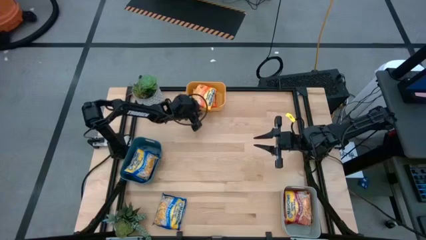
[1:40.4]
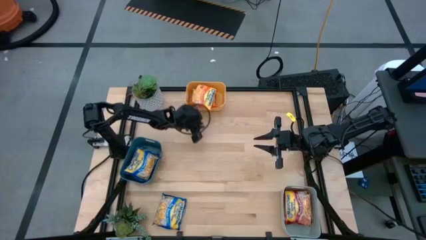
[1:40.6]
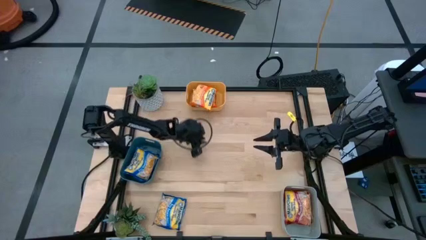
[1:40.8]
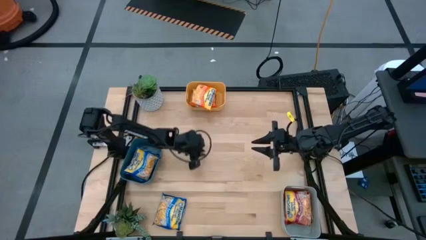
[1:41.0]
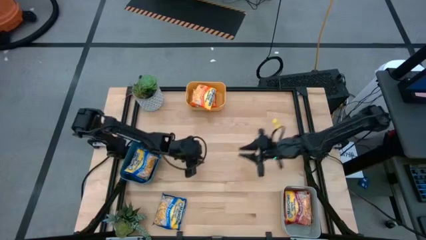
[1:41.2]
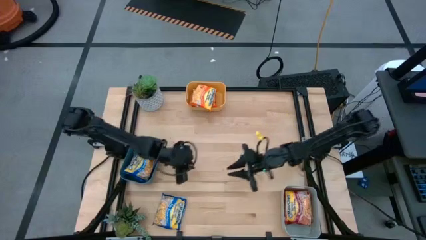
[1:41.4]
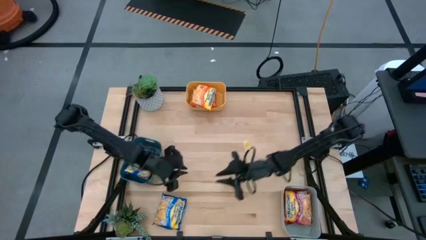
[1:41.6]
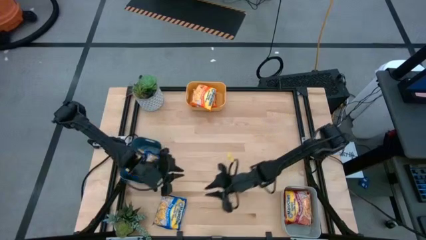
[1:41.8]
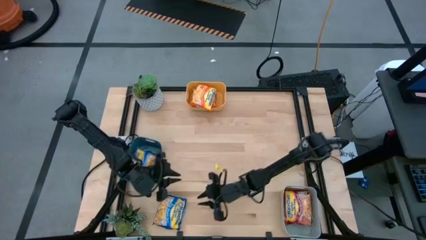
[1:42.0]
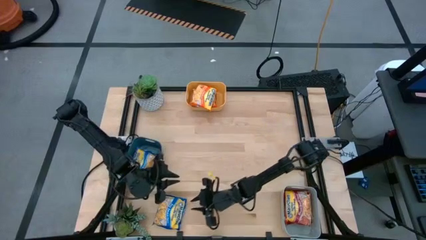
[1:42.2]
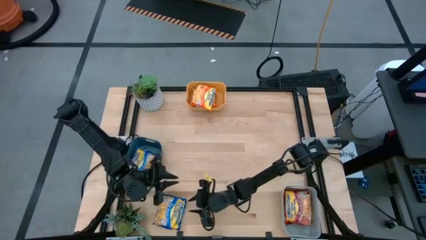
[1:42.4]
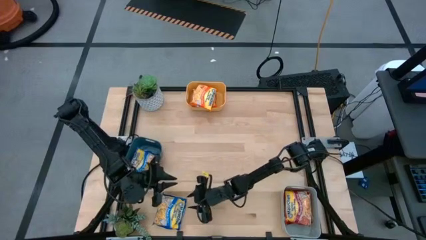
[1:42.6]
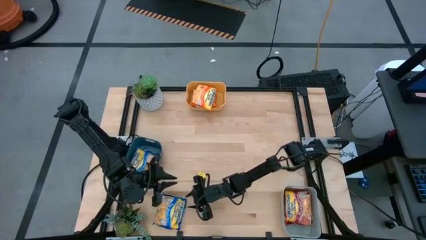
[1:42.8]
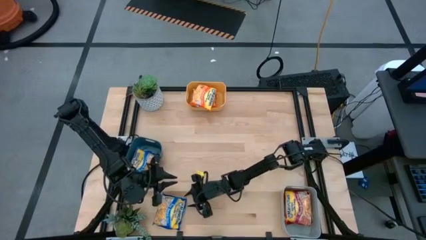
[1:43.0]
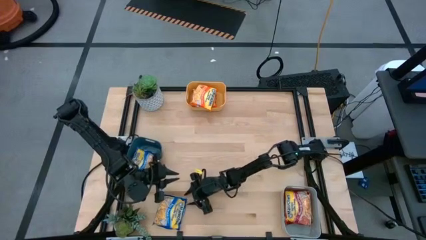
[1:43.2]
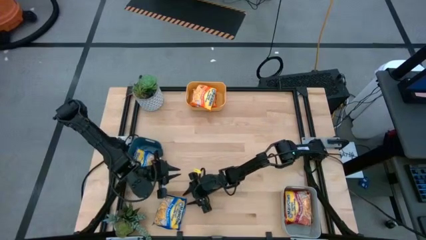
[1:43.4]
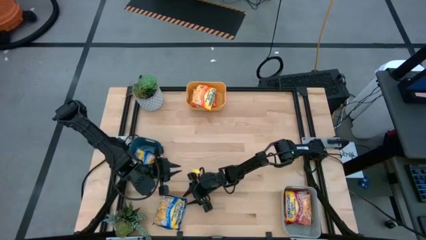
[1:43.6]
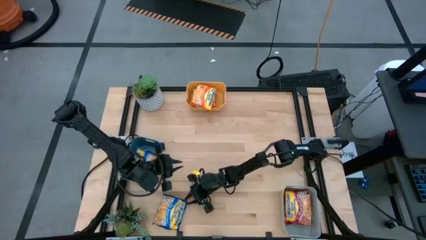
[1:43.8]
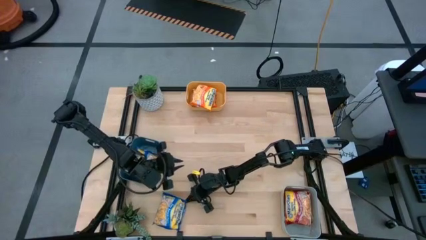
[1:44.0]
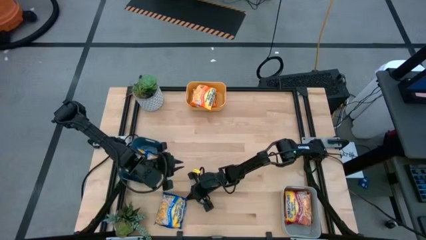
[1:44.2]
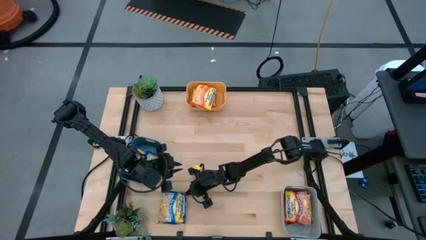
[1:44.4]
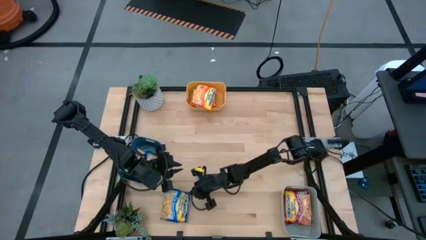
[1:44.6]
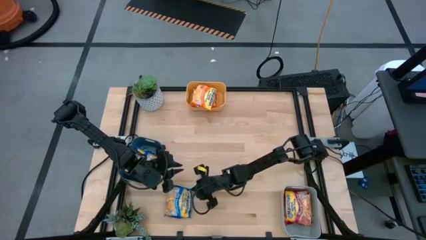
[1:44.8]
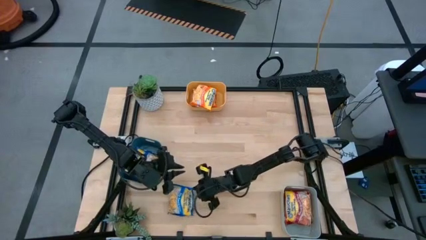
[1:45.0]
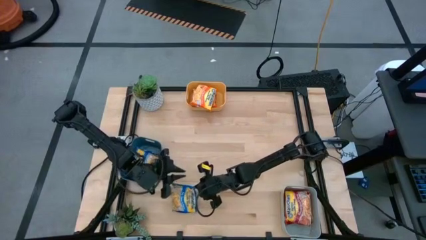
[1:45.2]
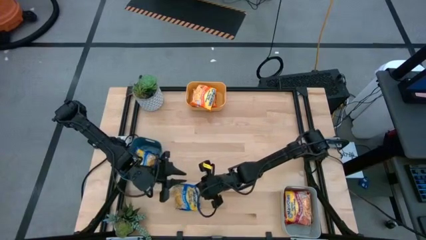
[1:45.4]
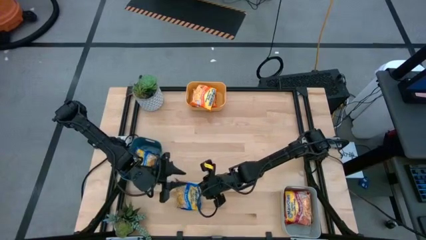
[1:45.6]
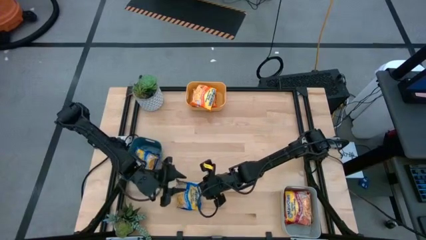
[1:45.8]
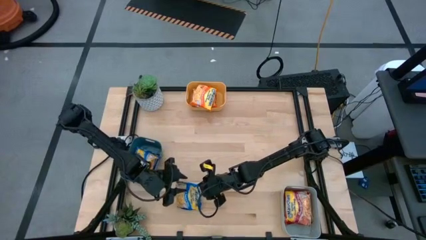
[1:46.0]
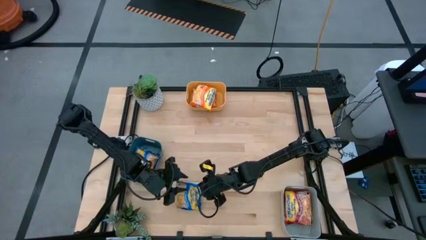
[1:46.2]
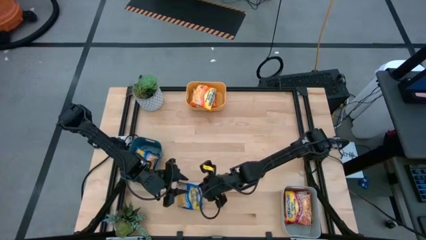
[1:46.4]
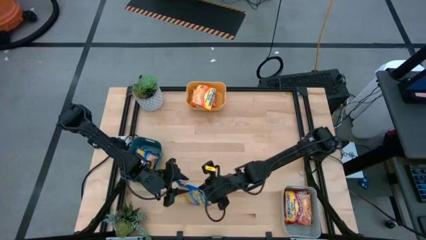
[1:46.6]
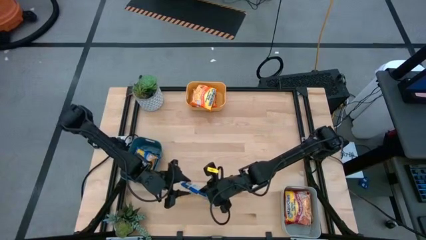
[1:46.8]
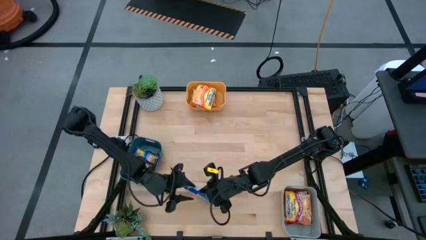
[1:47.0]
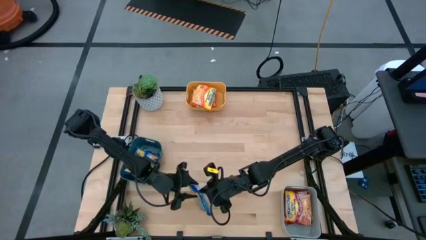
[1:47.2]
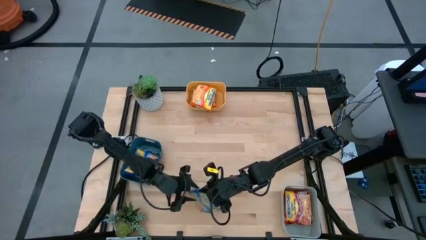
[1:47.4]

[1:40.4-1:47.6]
Task: Sort Maruchan noodles
Put the blue noodle pack into the blue bin

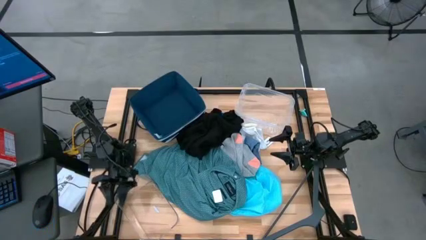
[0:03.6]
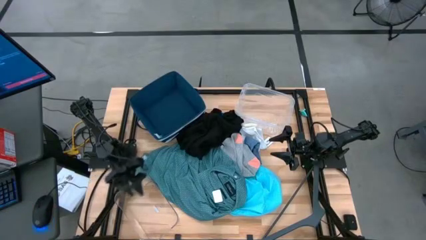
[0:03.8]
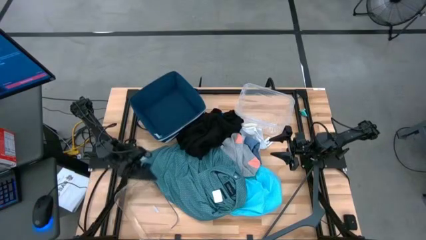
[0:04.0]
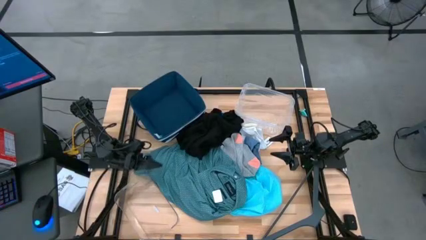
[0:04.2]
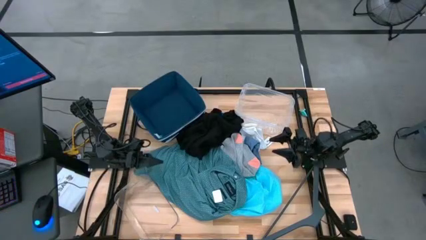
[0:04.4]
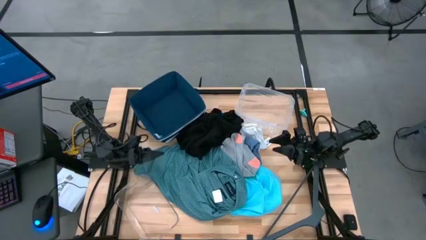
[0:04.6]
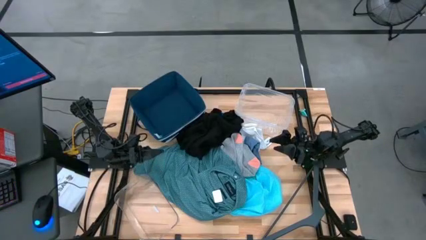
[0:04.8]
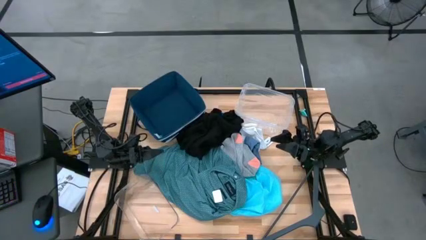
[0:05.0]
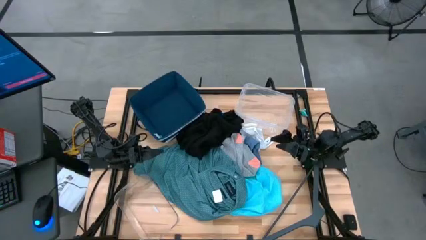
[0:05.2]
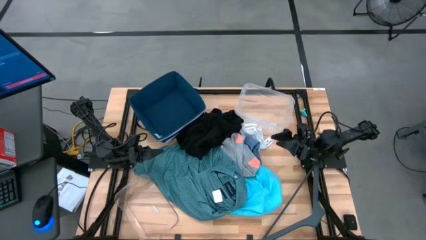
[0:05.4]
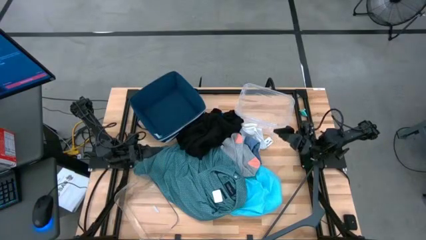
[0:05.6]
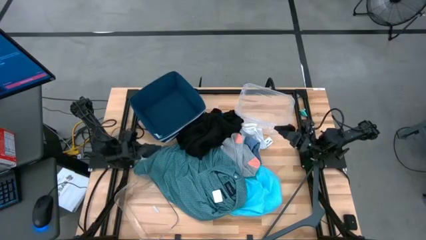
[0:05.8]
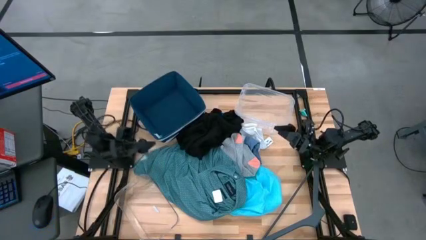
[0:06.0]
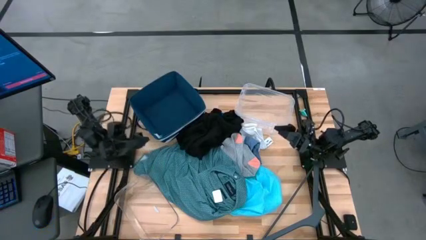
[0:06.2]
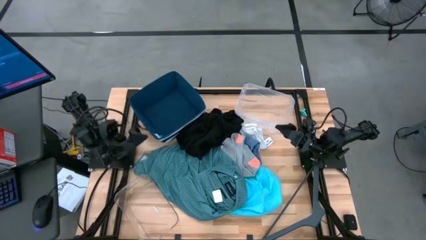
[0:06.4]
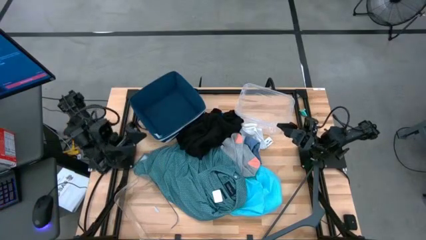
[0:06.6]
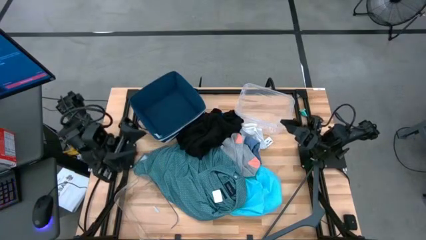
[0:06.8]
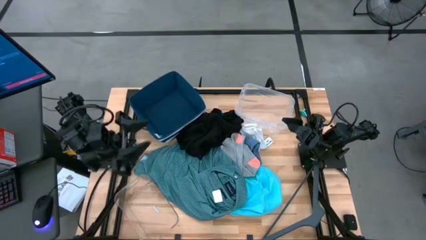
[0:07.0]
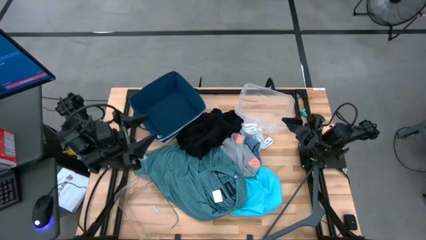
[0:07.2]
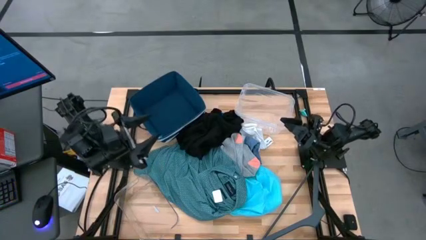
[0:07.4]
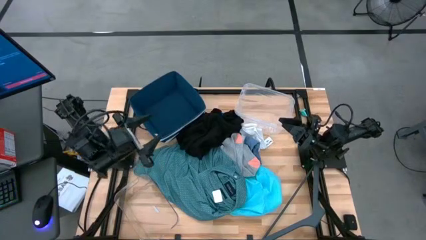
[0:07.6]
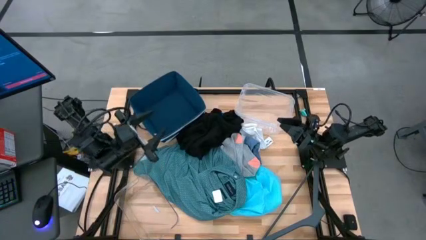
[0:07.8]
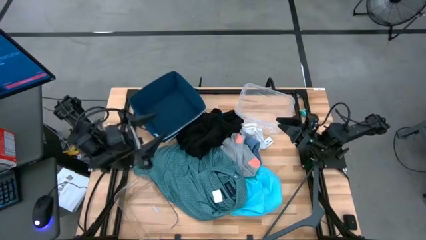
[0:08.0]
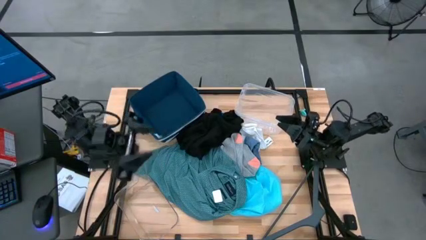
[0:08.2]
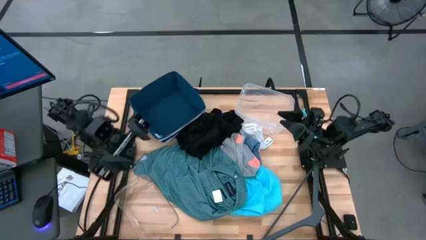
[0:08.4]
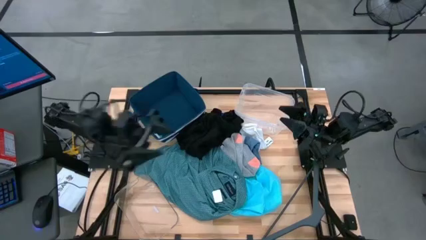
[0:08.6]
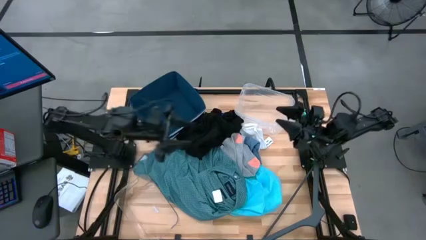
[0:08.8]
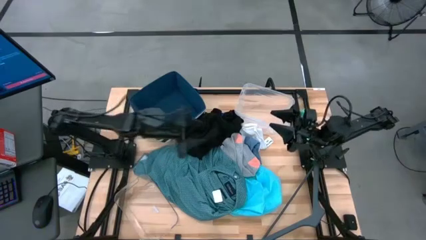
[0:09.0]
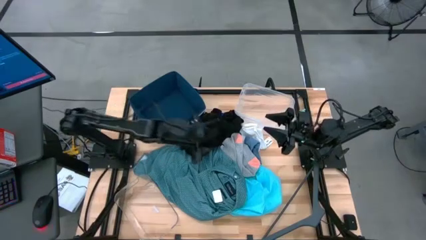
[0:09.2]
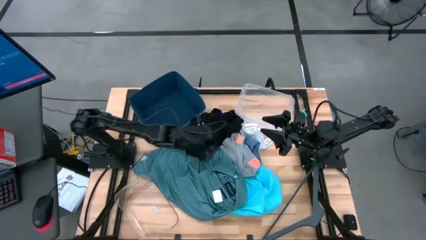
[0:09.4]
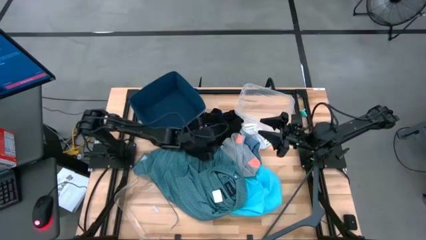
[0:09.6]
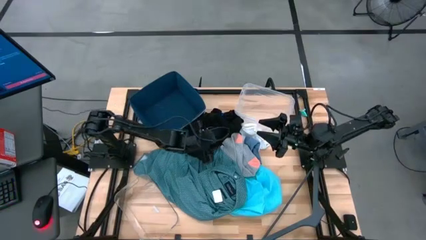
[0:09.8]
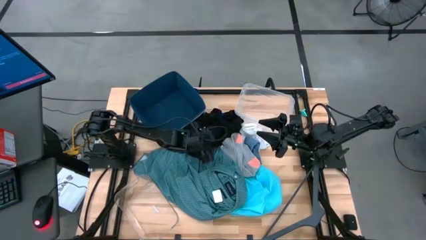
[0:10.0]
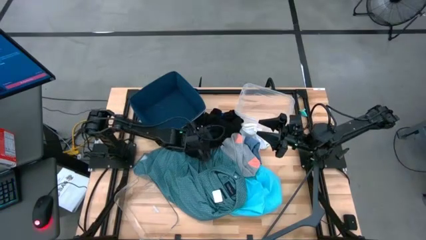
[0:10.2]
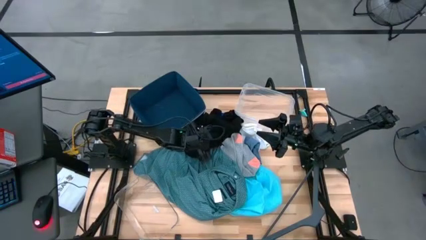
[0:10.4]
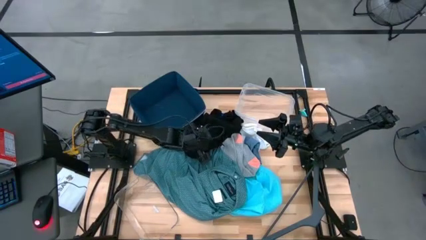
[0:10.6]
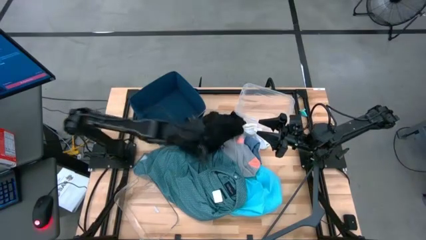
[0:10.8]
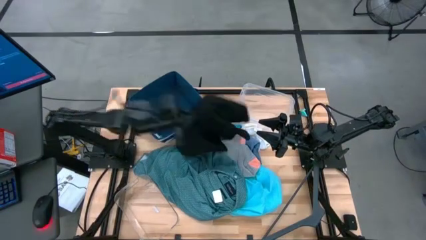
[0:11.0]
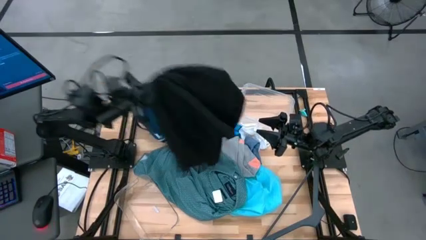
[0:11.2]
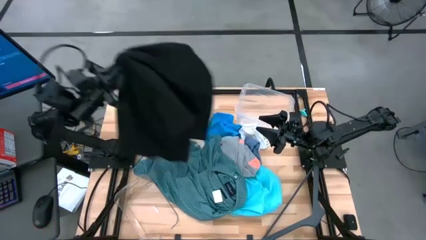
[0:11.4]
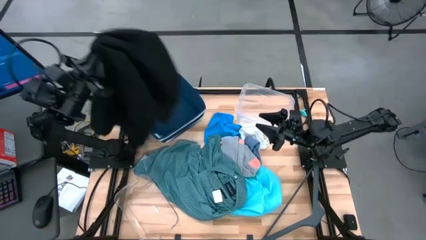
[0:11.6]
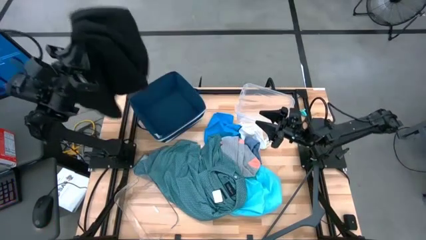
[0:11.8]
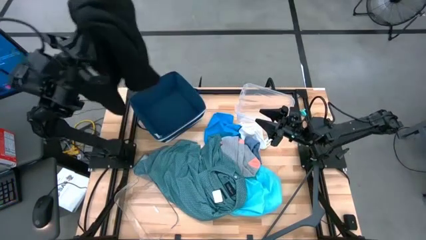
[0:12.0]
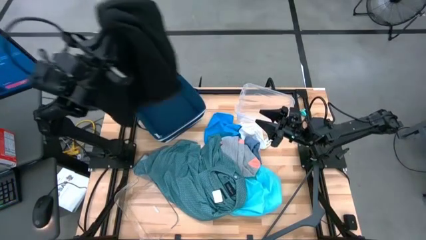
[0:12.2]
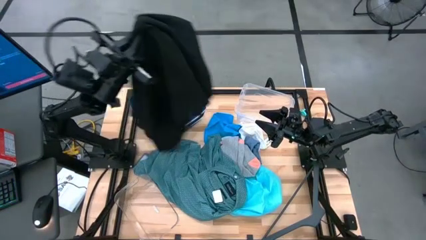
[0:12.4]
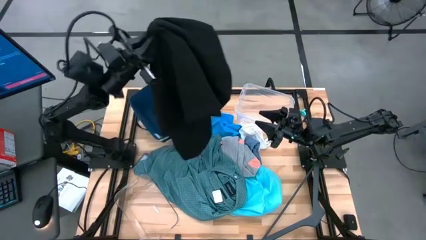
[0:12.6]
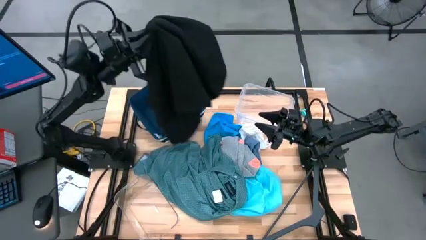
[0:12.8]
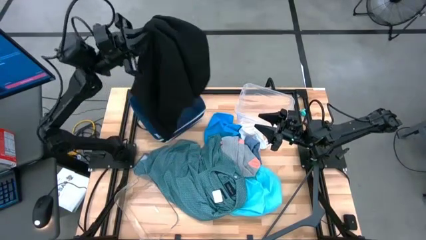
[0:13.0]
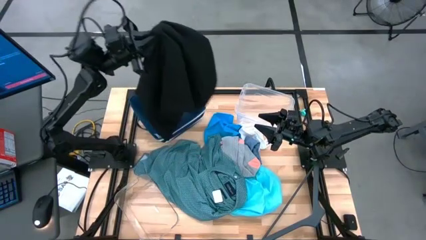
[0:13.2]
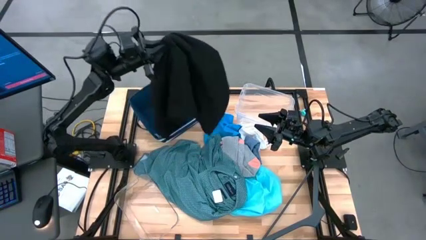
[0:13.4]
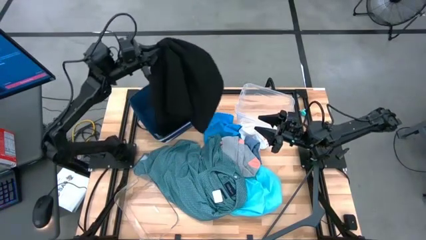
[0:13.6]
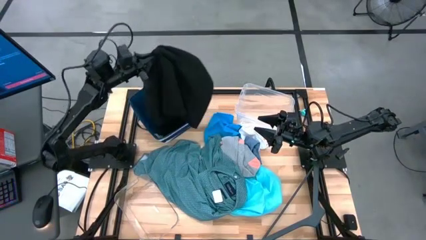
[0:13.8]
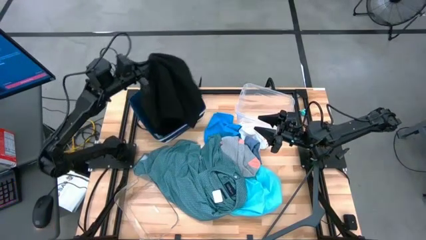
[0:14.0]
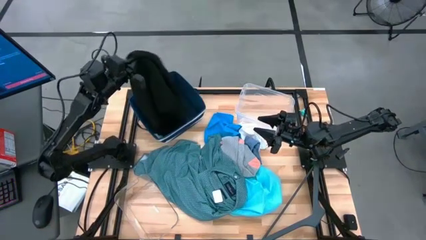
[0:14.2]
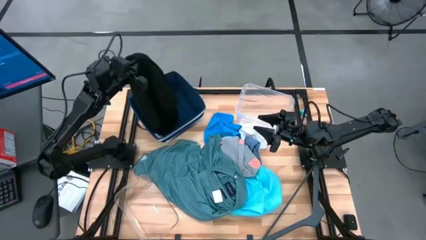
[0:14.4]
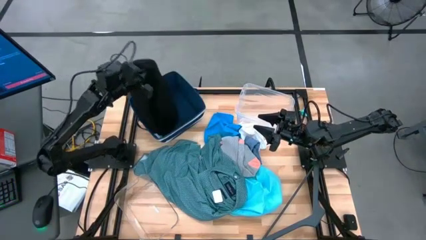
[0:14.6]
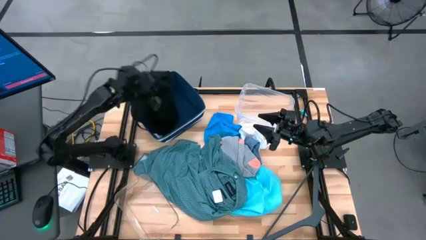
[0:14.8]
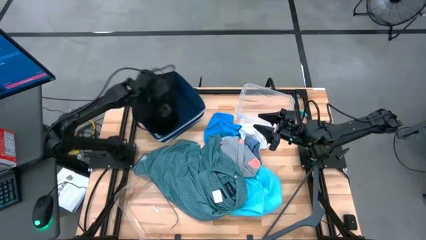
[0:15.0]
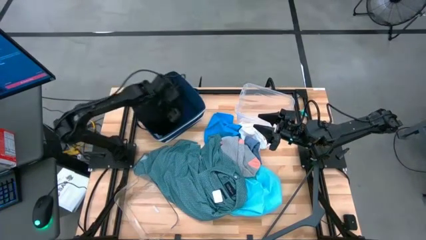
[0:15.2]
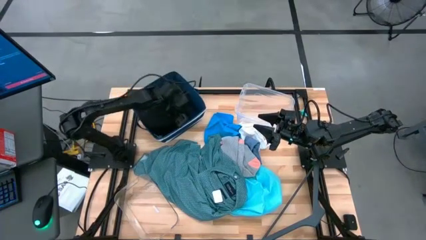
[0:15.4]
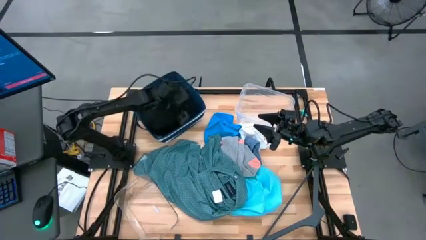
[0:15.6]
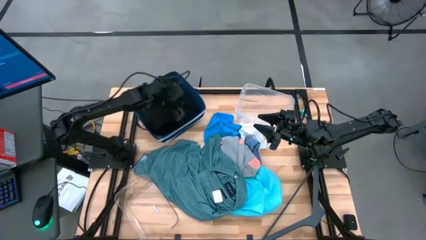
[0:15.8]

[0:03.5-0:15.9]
Task: Pick & Place Cloths
Put the black shirt into the blue bin
